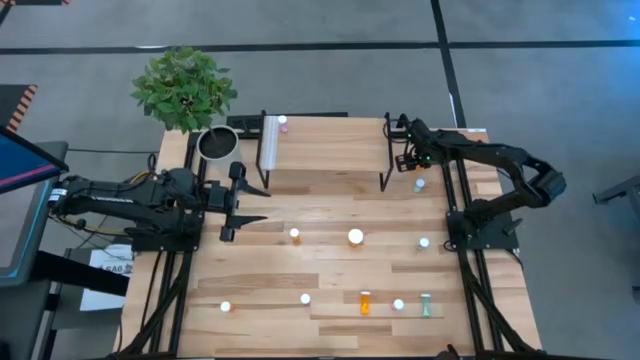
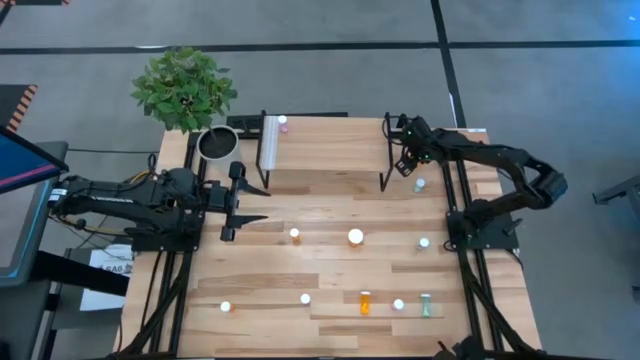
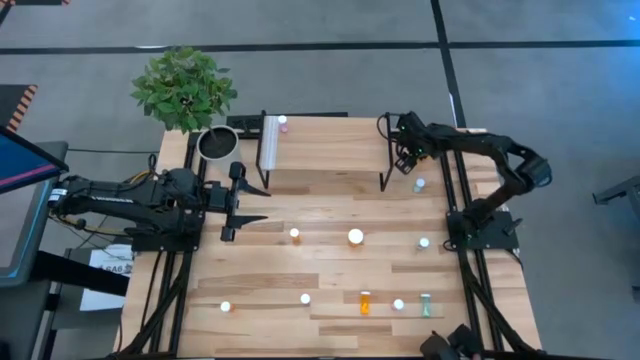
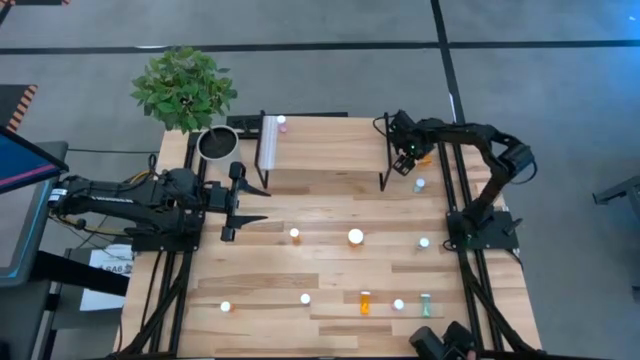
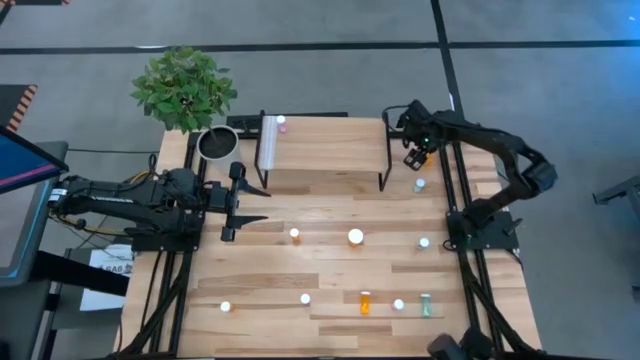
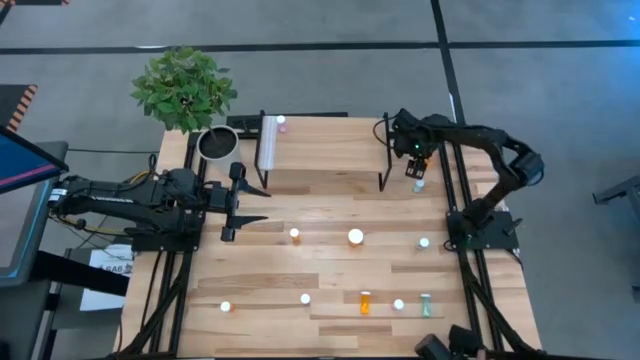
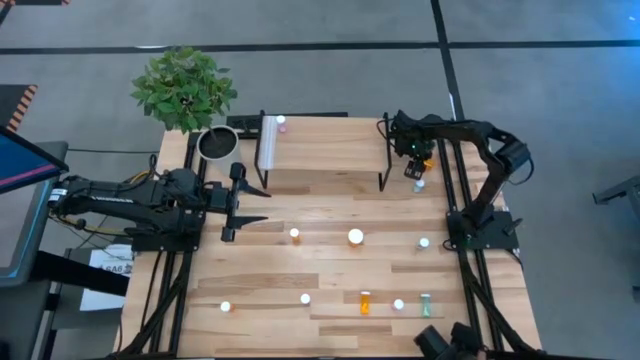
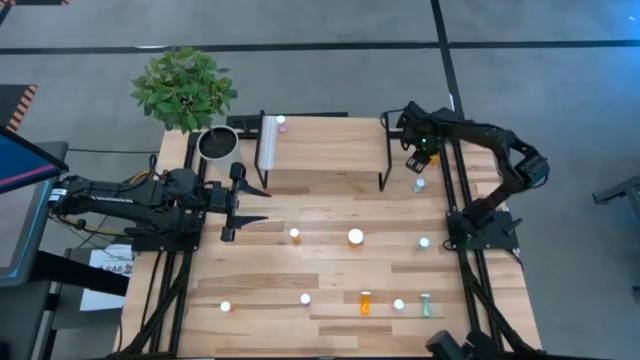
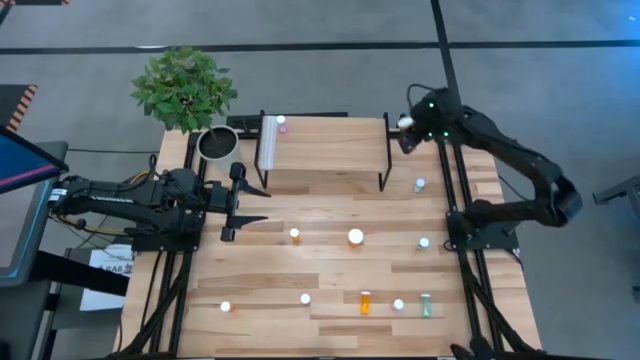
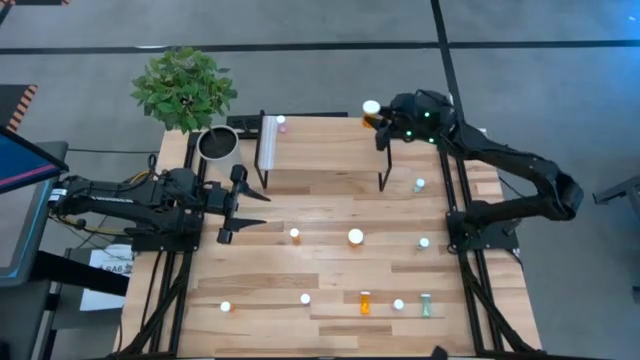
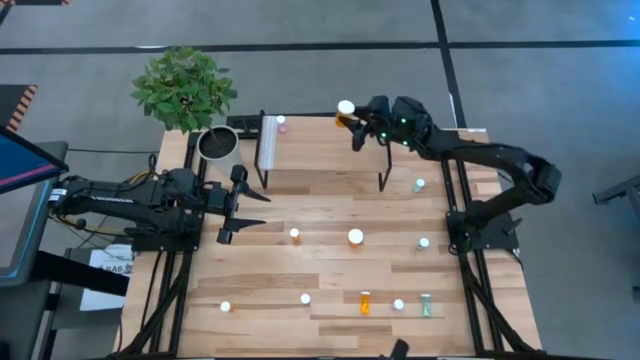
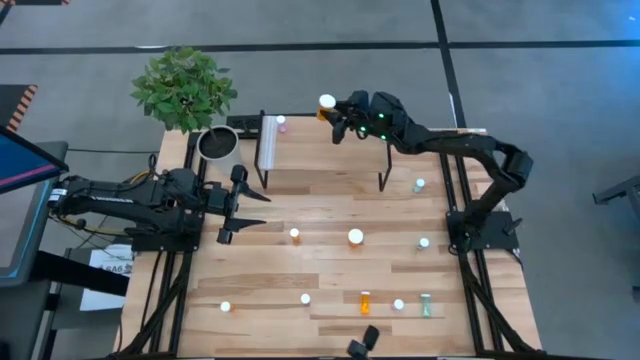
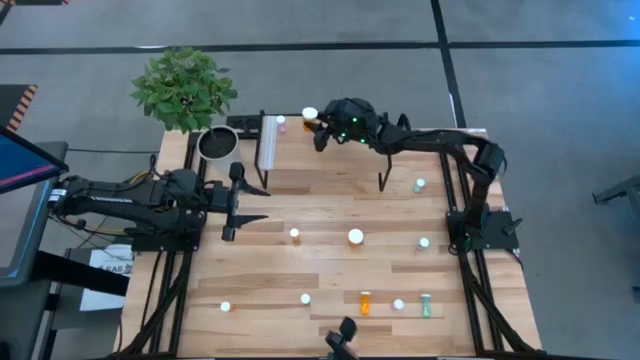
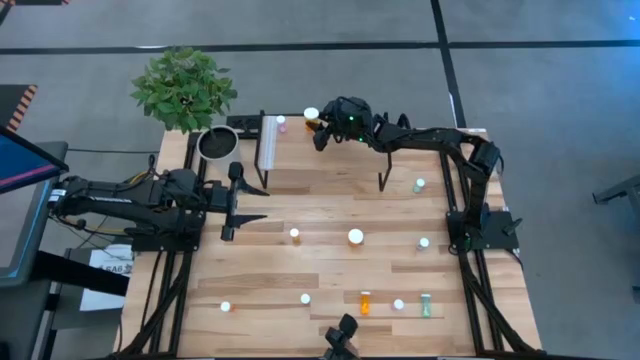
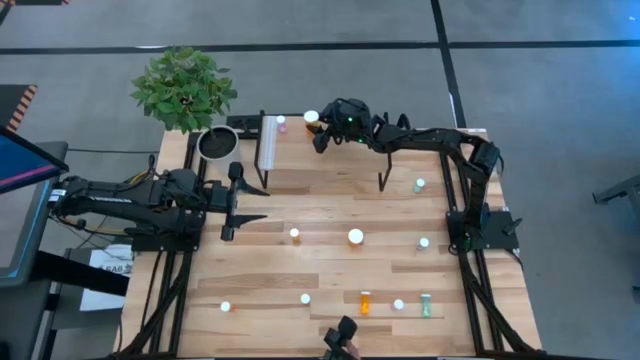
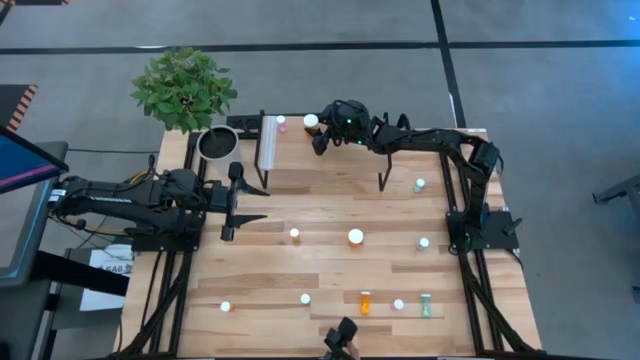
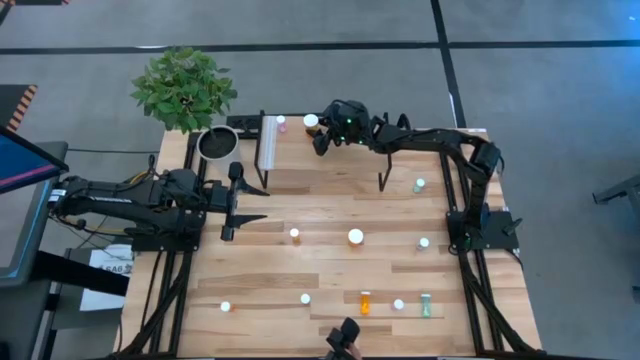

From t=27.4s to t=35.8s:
Task: Pick and place medicine bottles onto shelf by color
Put the top large orange pill bottle on the shelf

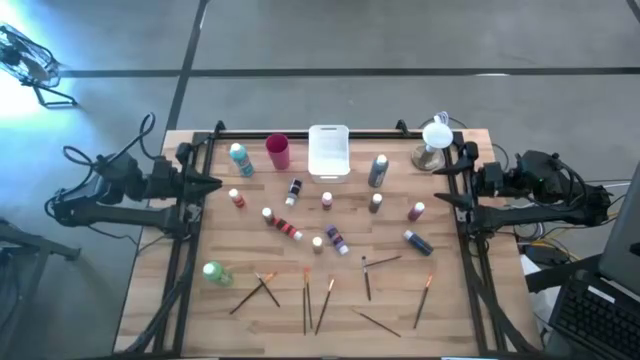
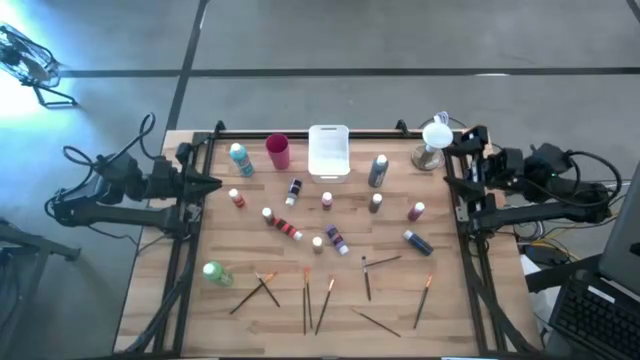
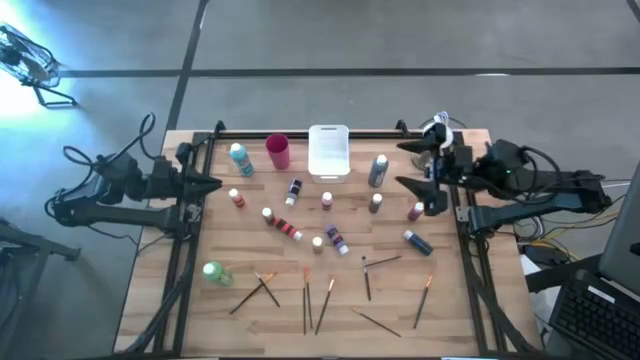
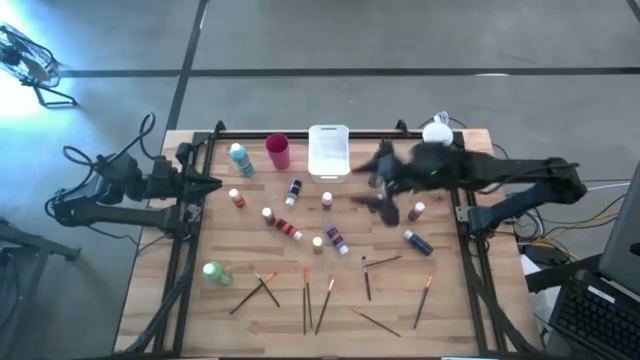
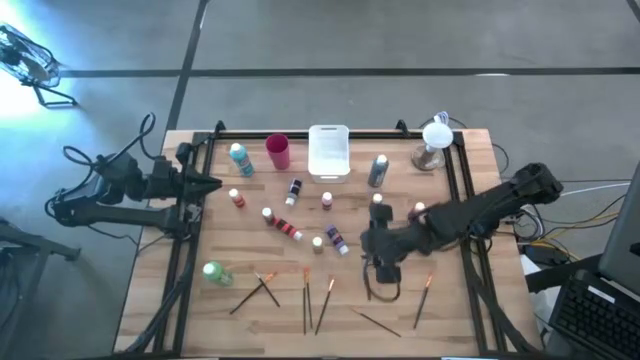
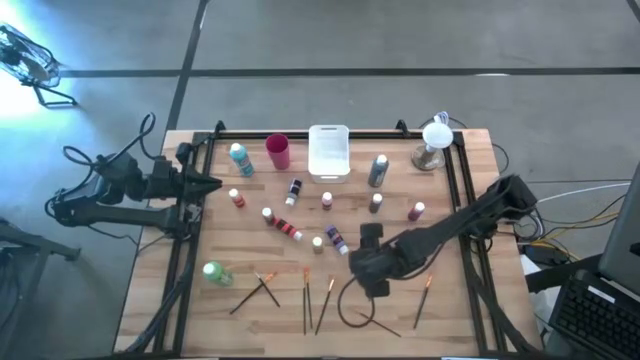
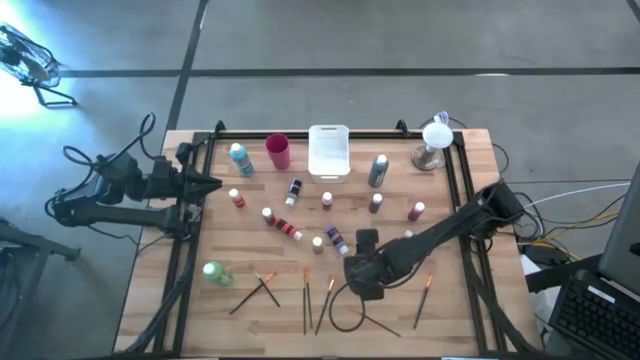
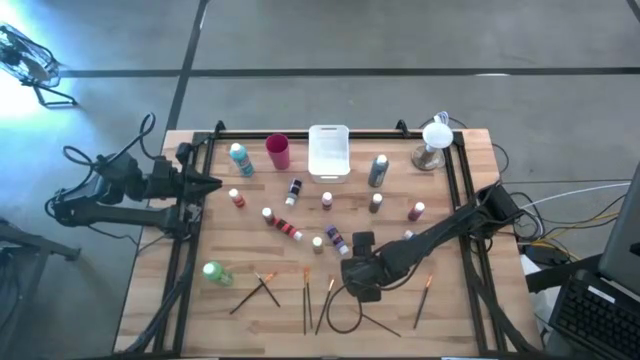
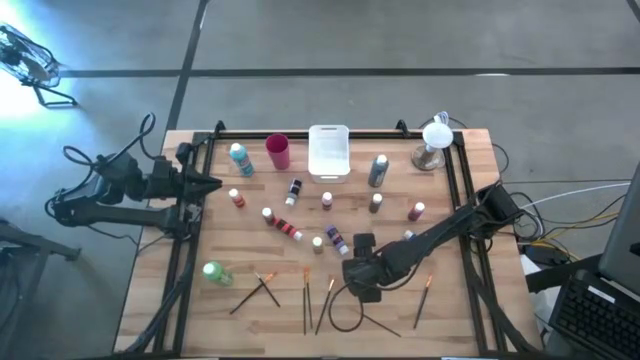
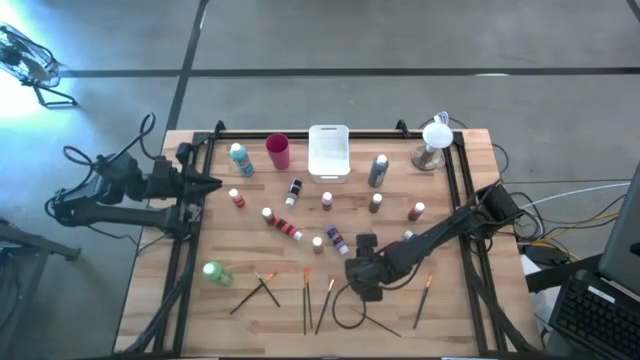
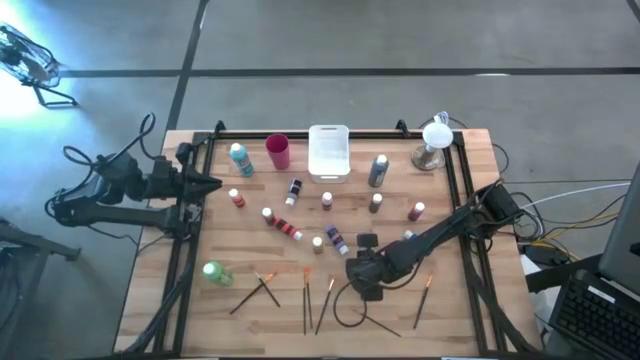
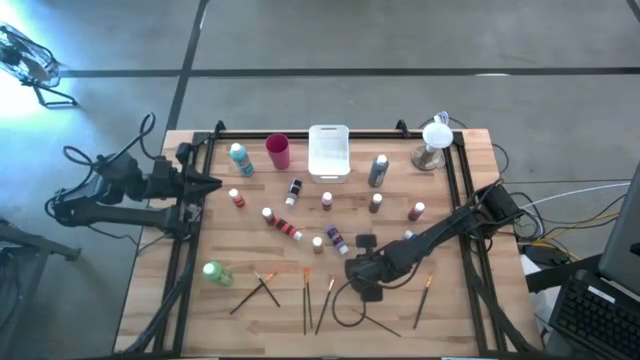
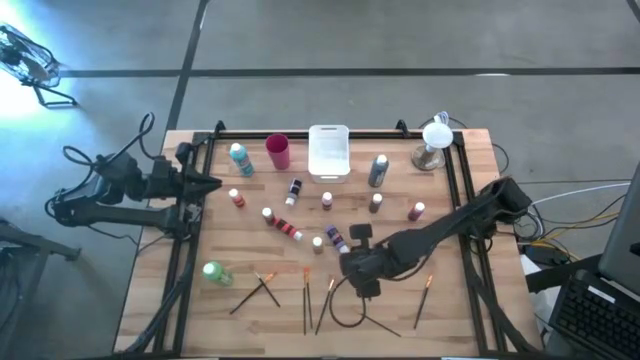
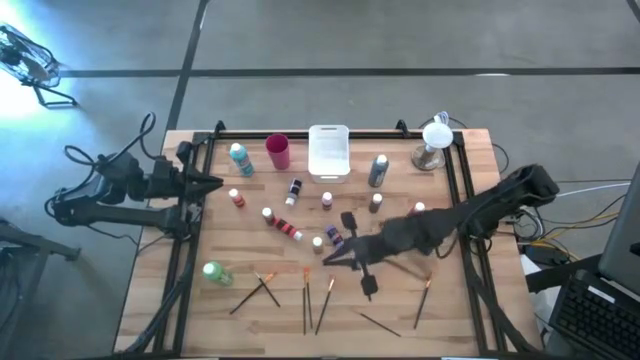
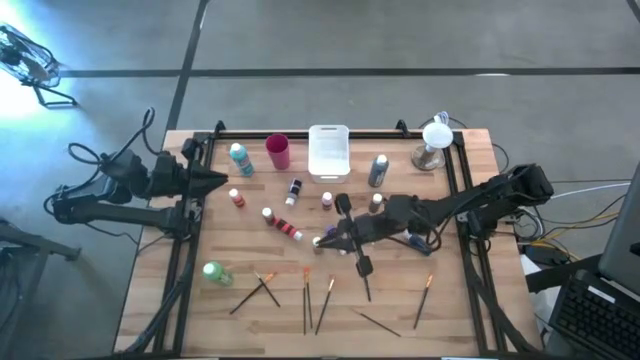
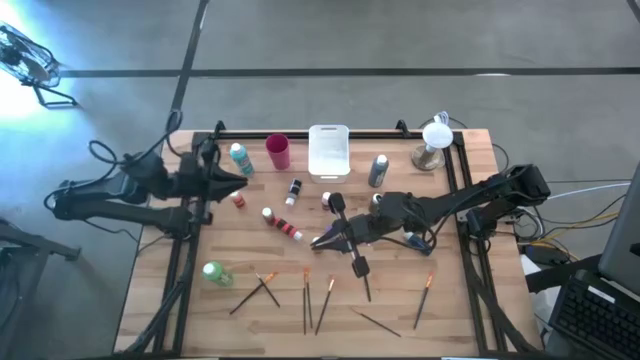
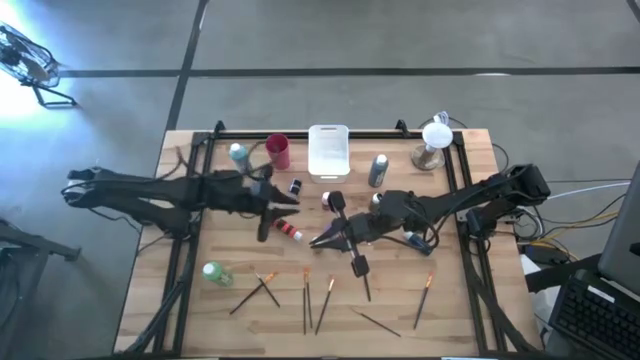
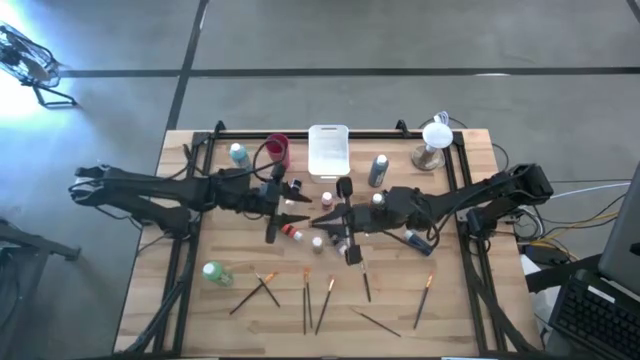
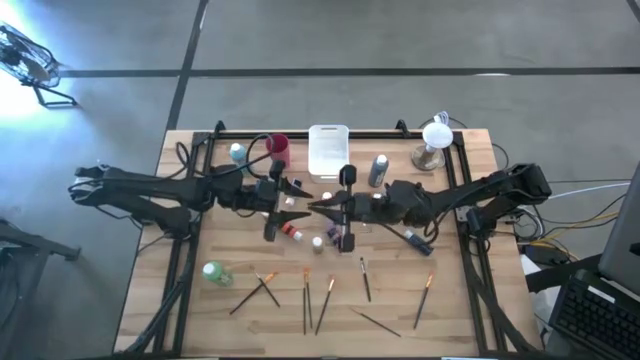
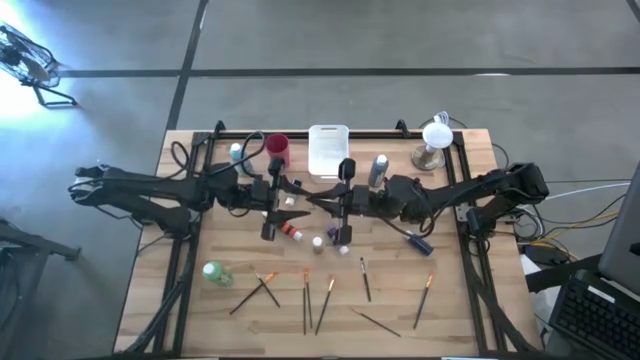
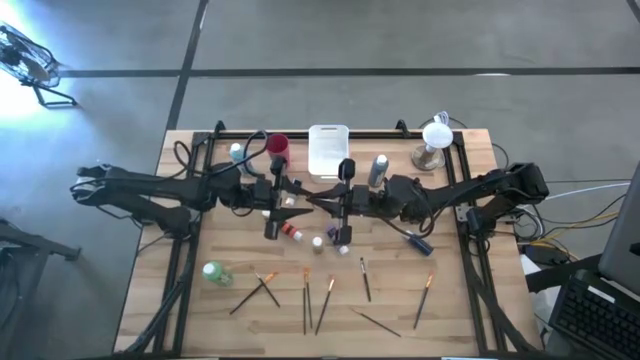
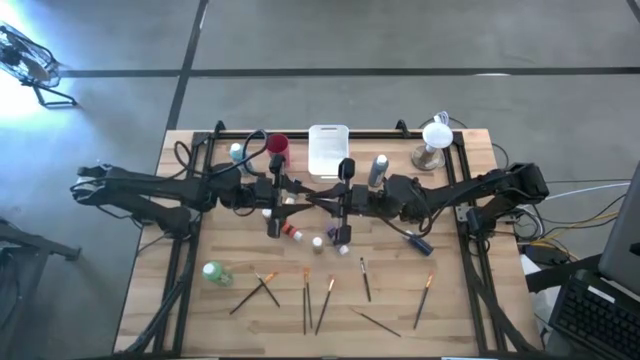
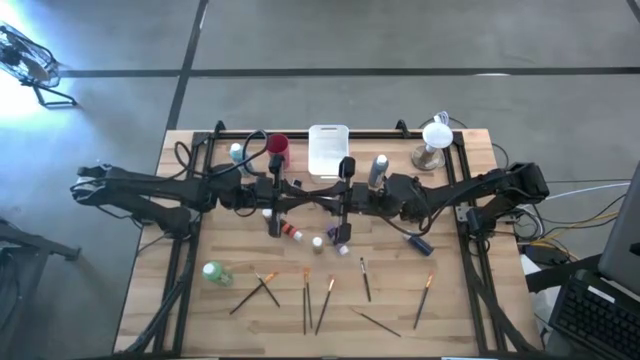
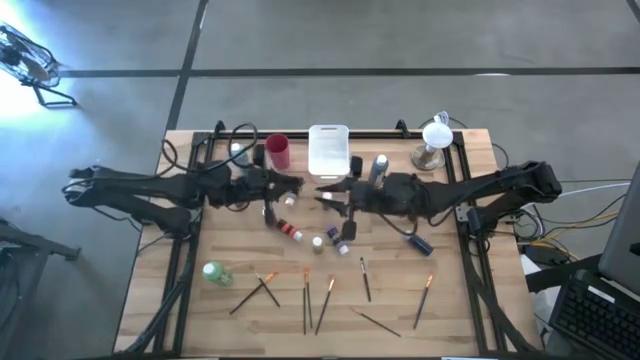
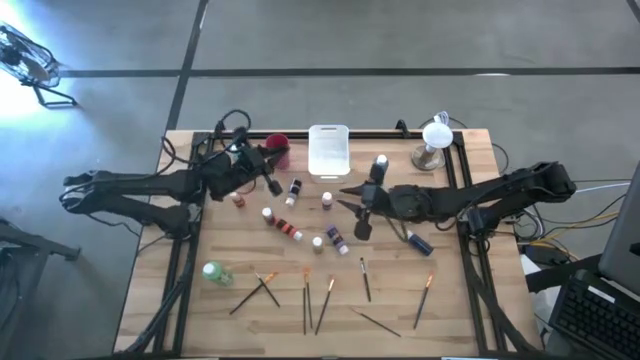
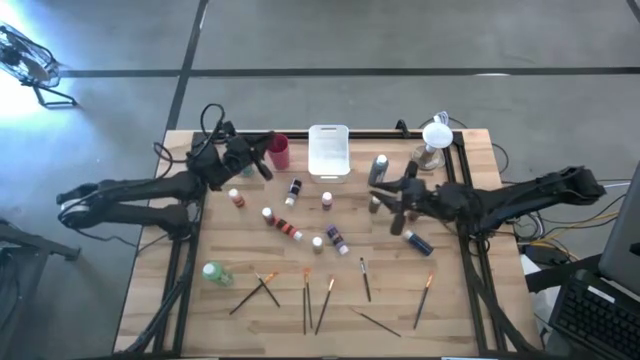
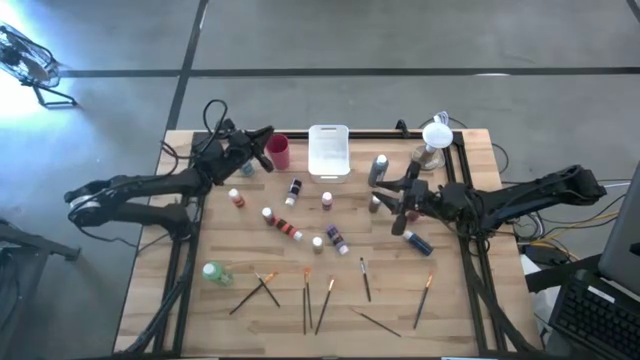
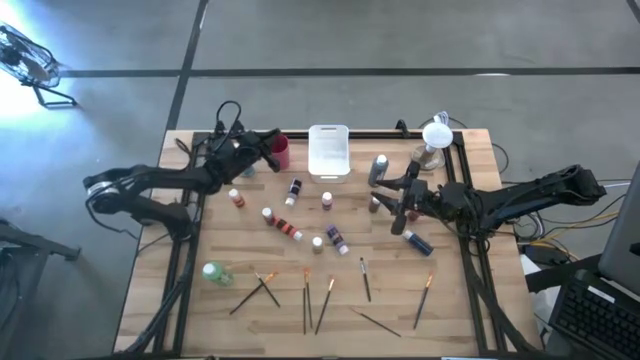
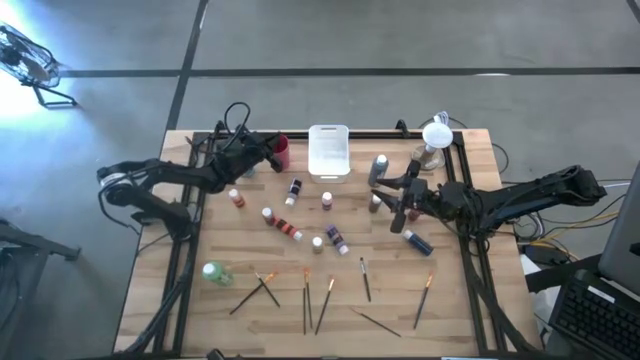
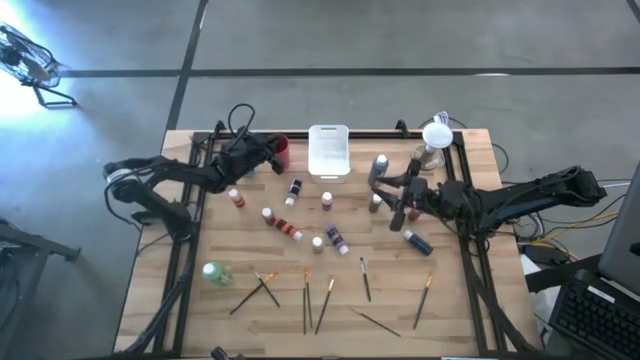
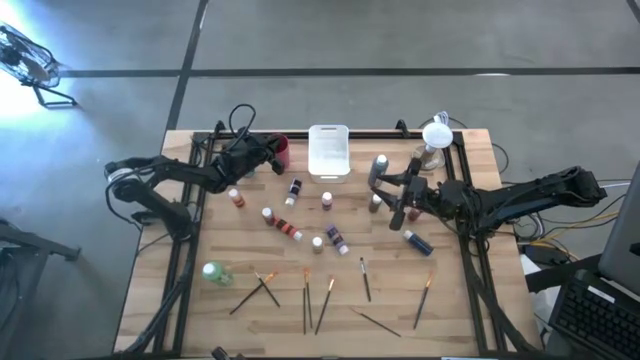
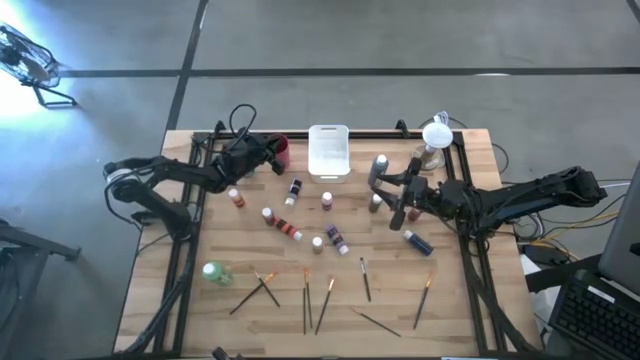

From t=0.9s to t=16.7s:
Task: Pick & Place Paint Supplies
Put the gold paint brush into the pink cup
